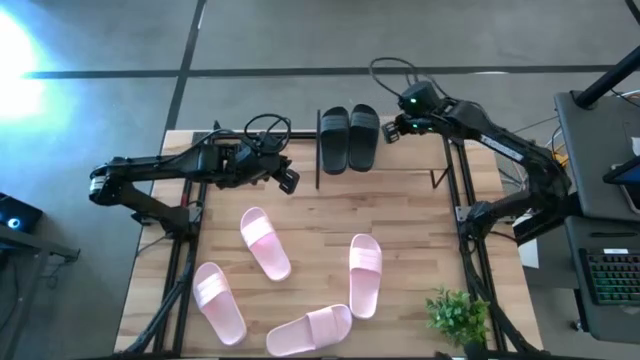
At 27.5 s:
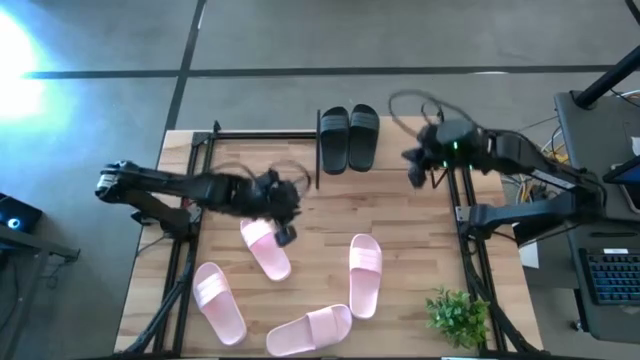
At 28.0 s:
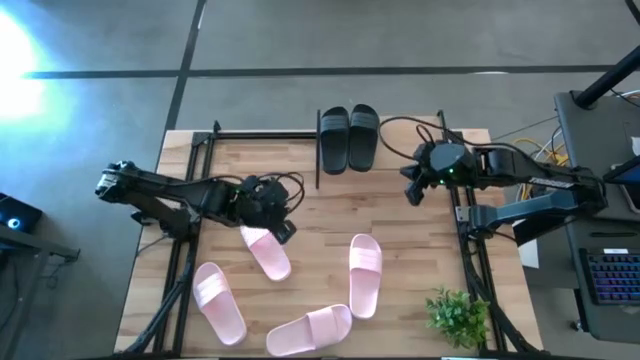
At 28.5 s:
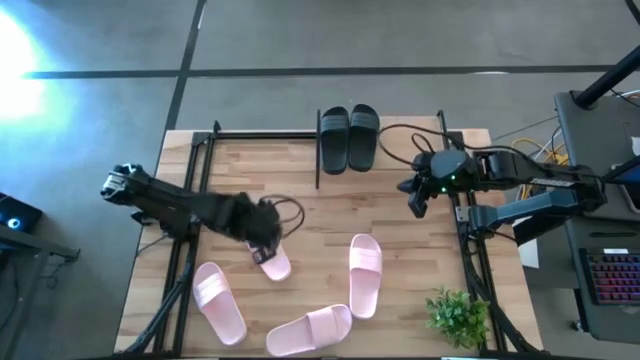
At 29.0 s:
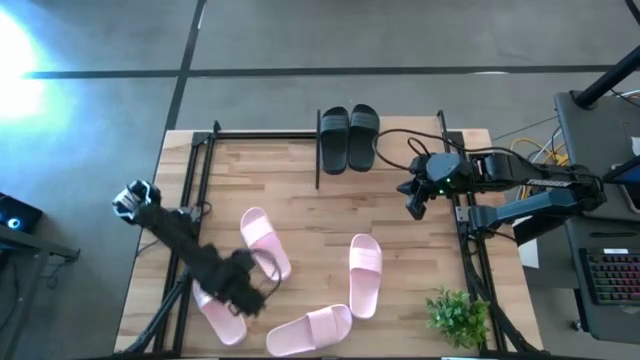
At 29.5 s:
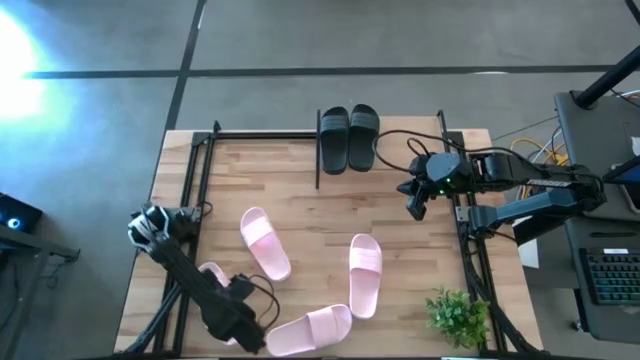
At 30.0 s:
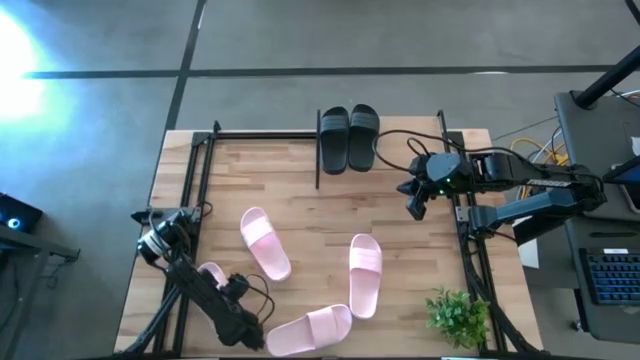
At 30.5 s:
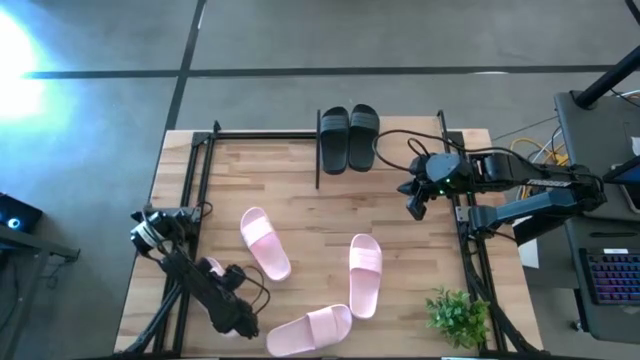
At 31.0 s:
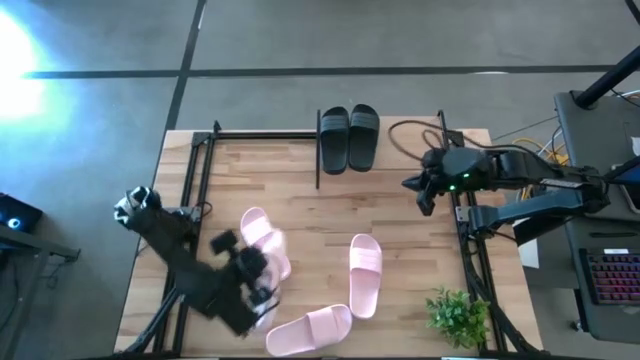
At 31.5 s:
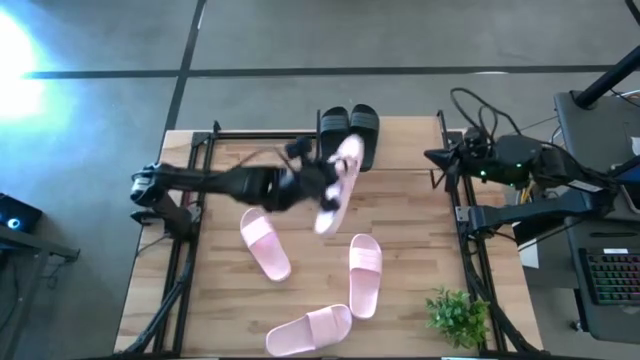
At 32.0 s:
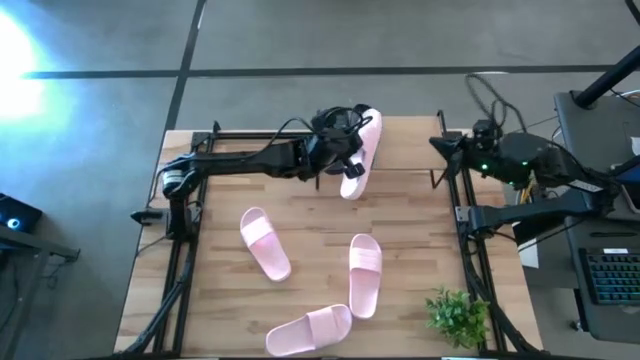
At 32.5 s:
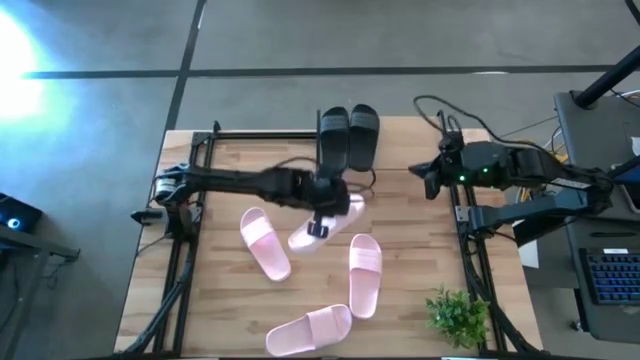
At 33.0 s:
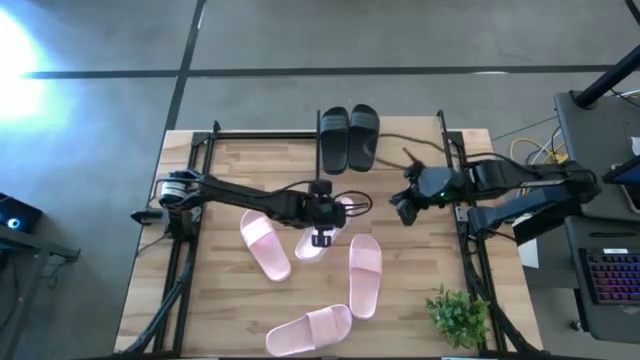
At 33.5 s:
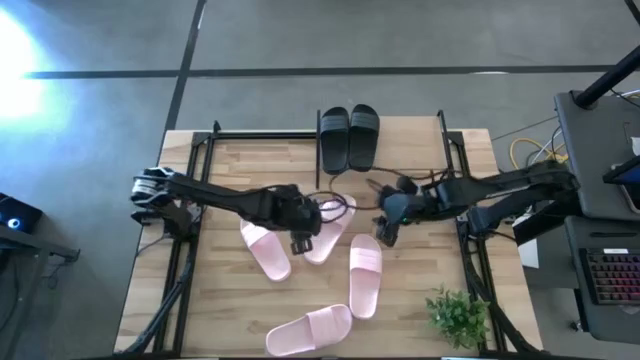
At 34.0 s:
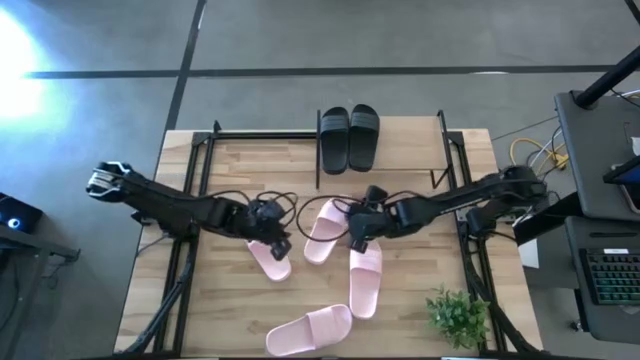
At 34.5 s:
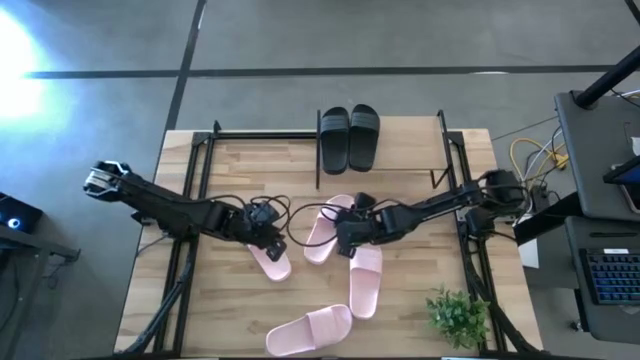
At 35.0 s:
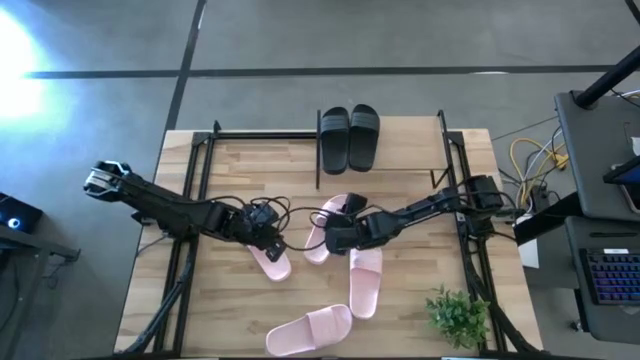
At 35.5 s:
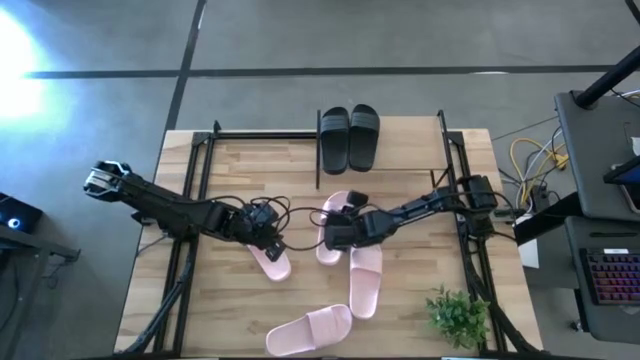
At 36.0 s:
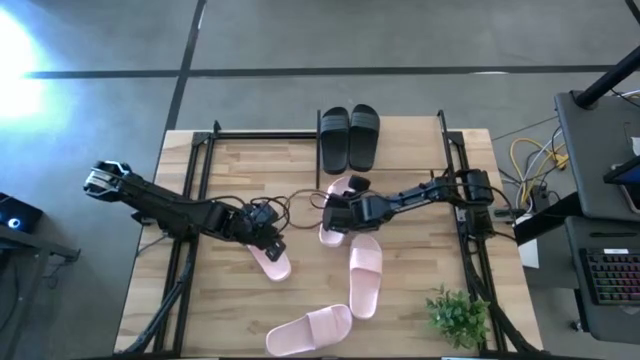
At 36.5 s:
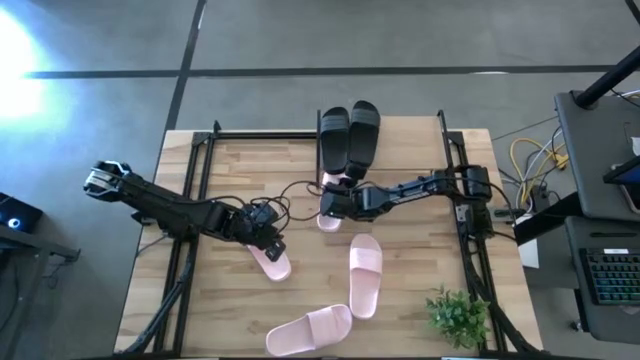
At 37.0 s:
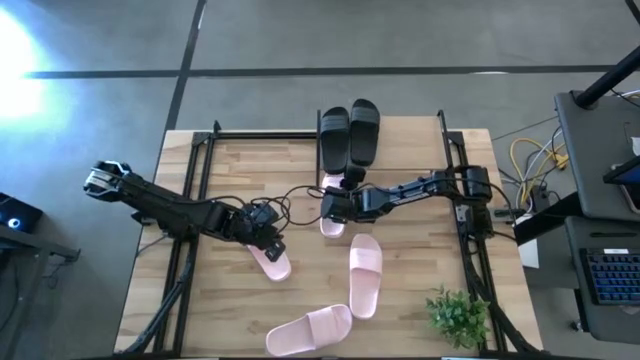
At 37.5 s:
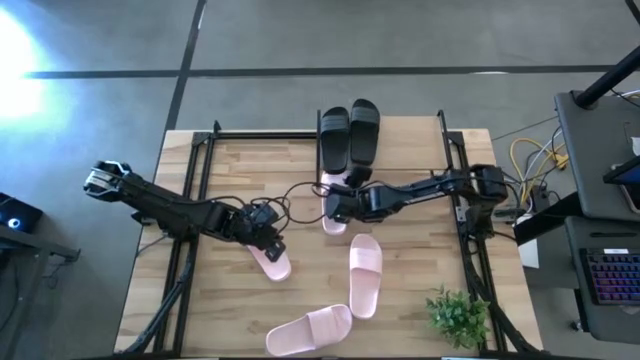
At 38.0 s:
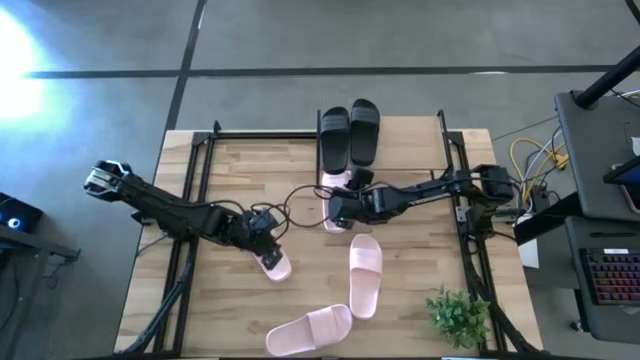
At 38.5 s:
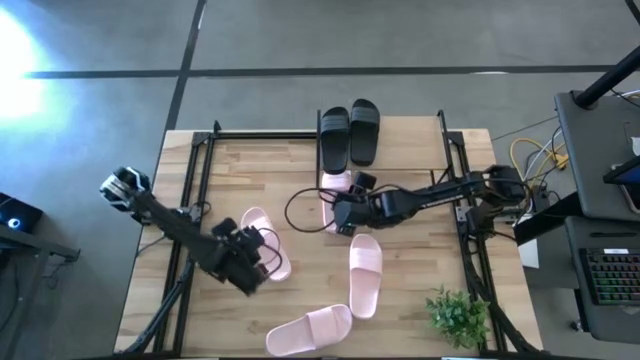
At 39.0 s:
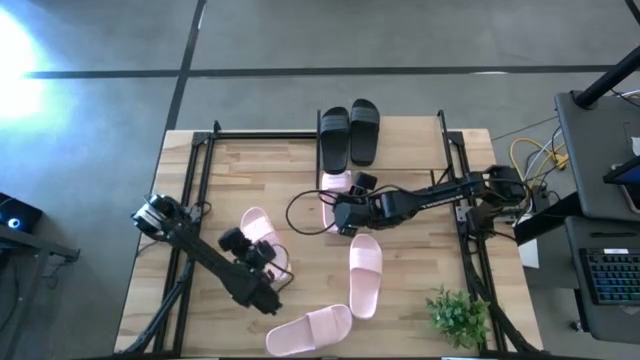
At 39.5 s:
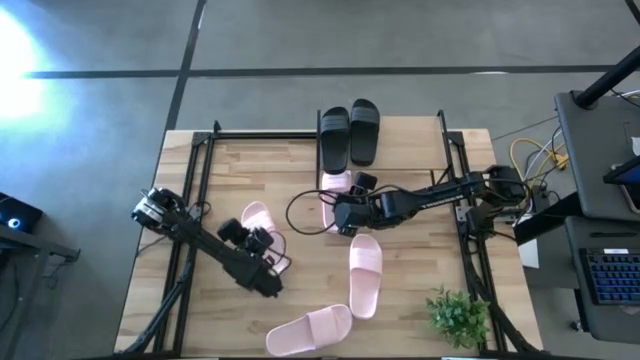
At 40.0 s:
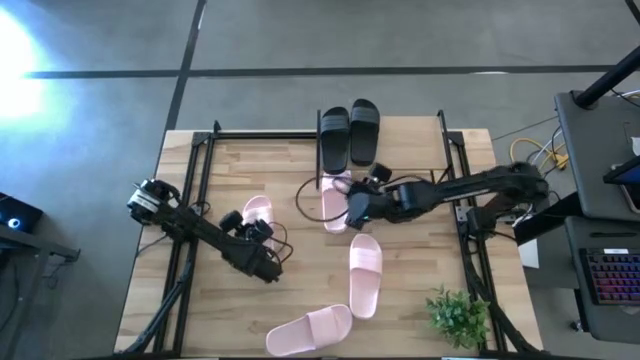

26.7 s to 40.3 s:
Task: Pick and place slides into the shelf
Put the pink slide under the shelf

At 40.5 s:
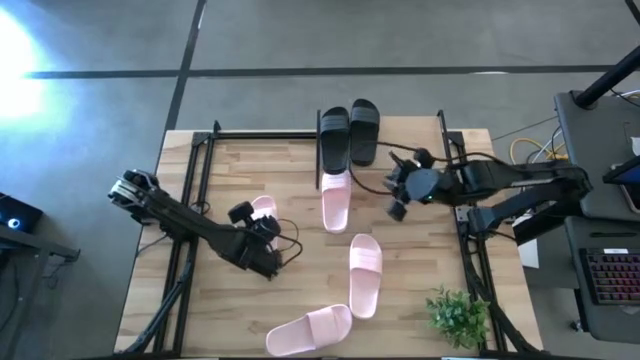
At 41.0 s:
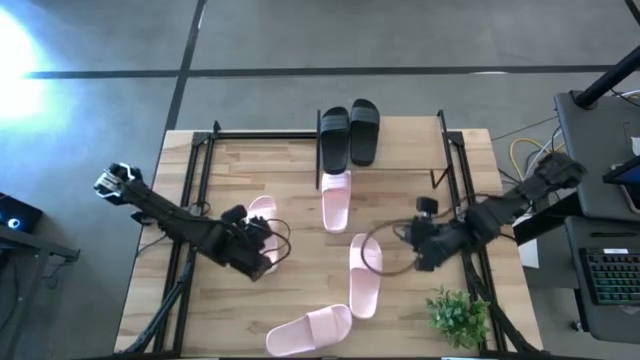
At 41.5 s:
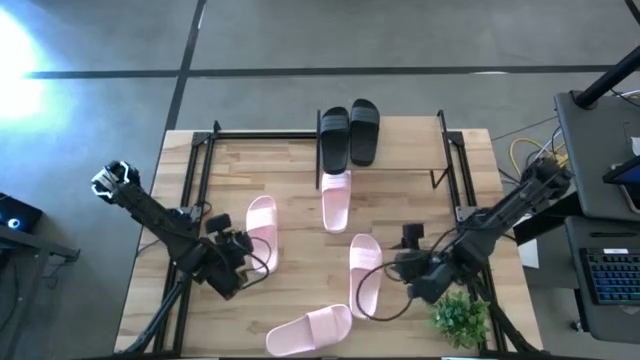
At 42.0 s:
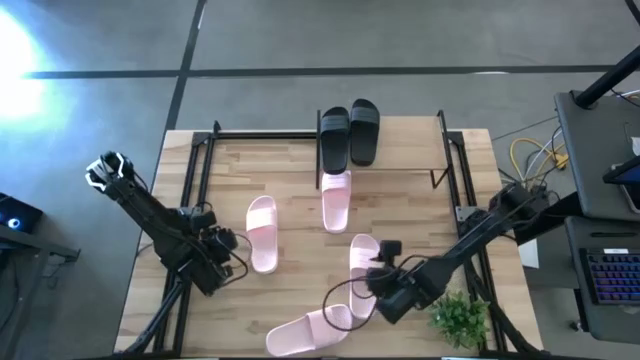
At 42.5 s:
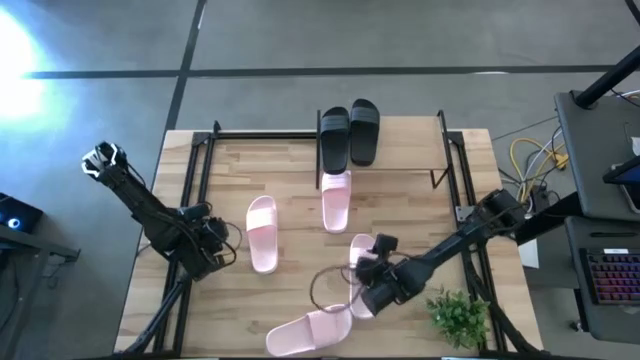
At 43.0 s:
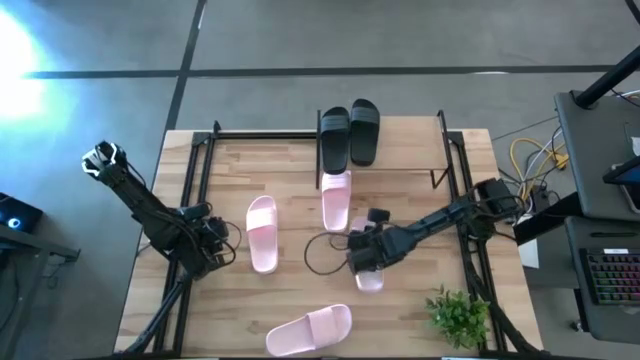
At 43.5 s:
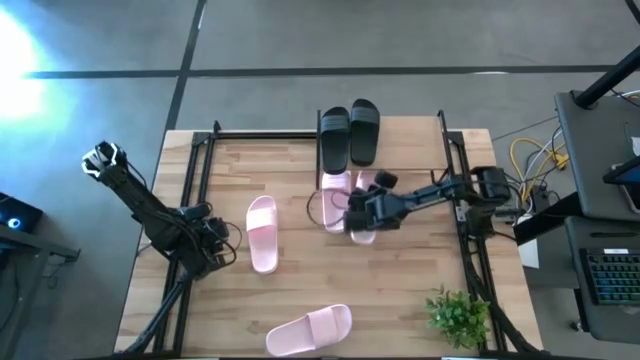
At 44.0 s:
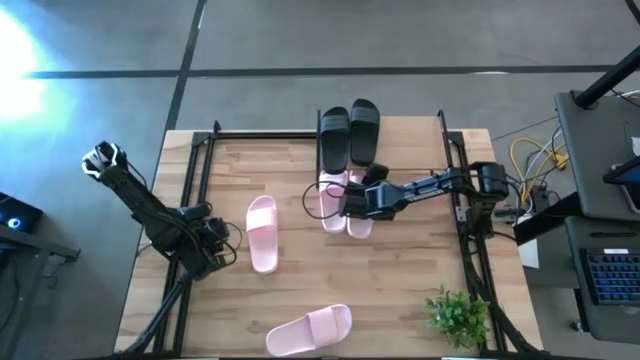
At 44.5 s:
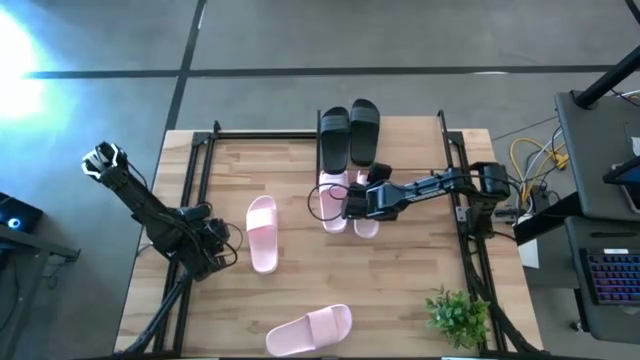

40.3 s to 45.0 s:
Put the pink slide under the shelf

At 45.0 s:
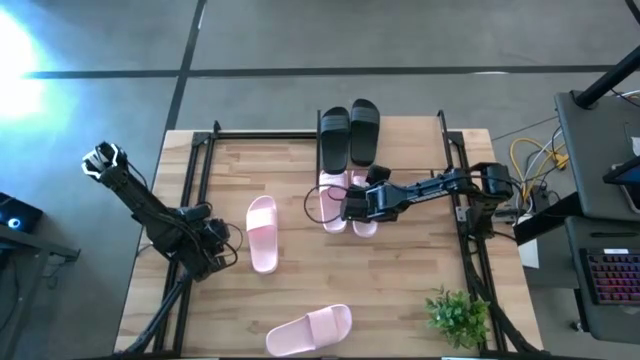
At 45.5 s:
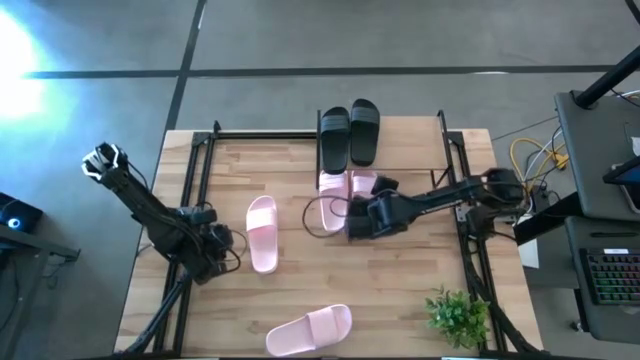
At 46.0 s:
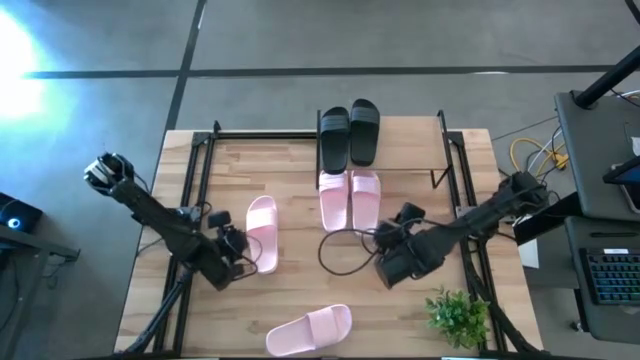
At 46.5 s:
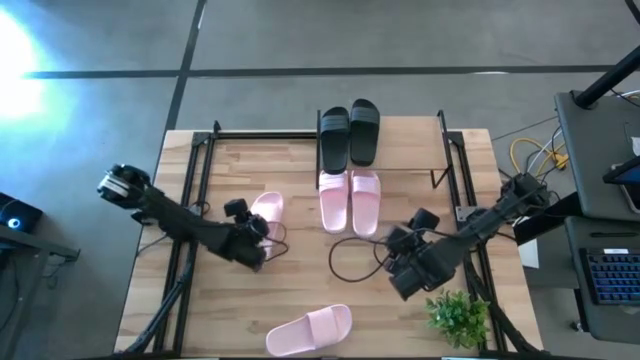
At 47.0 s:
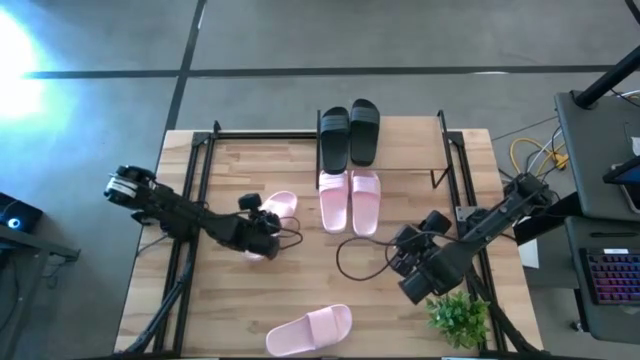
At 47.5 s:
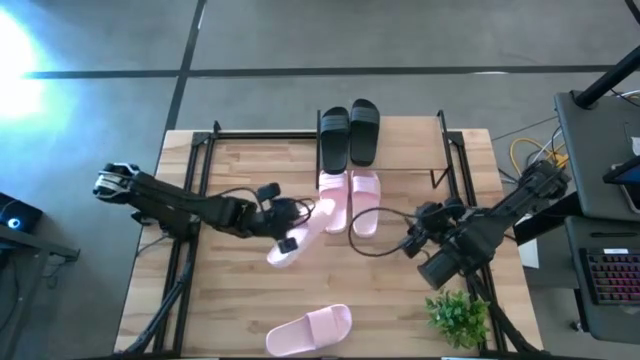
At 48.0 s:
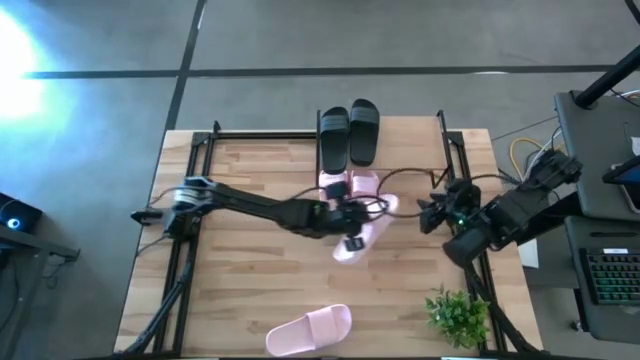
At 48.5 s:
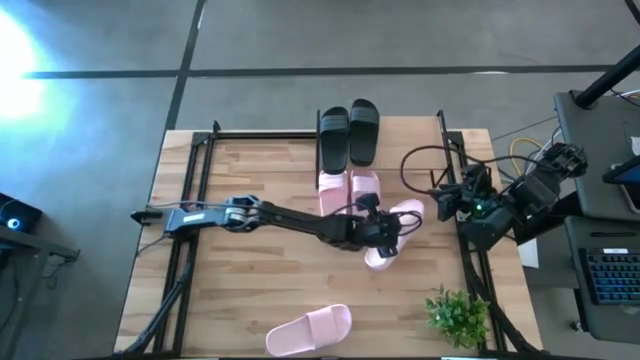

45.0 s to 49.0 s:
Put the pink slide under the shelf
